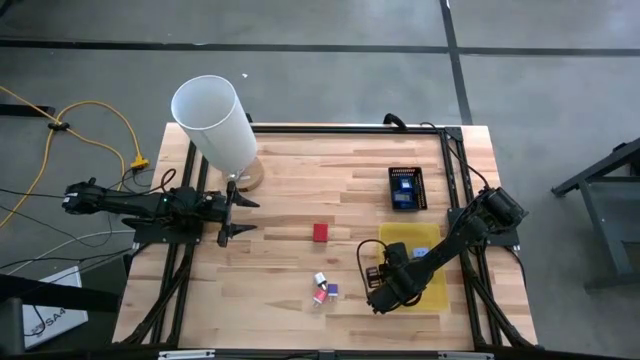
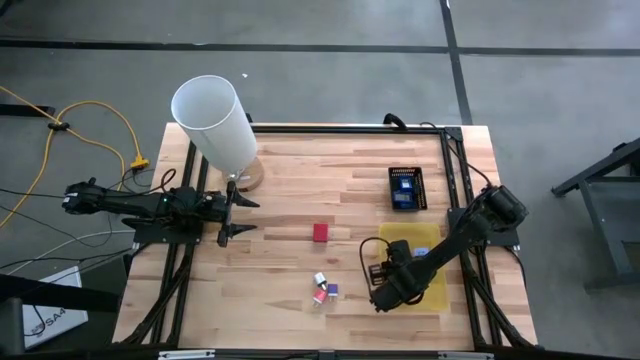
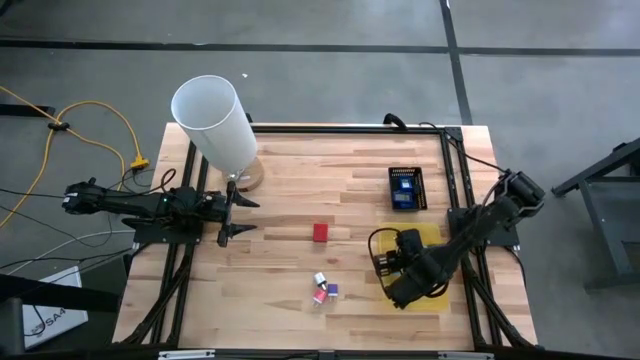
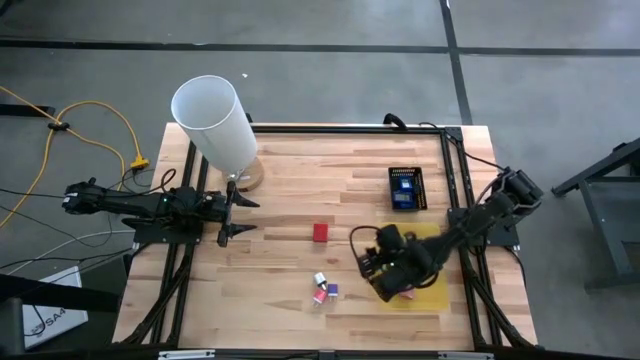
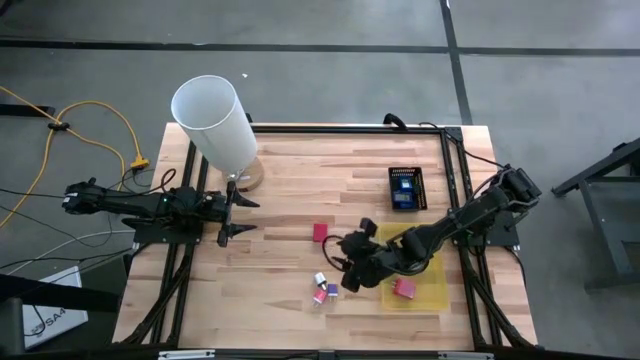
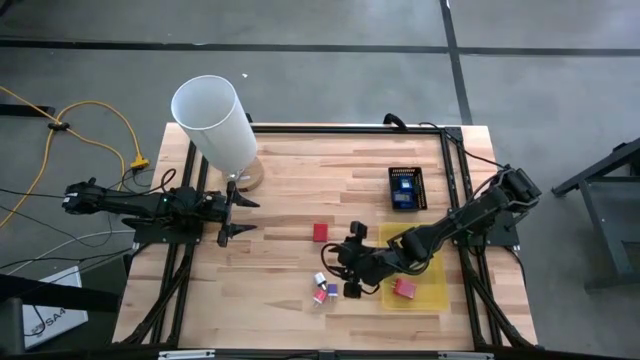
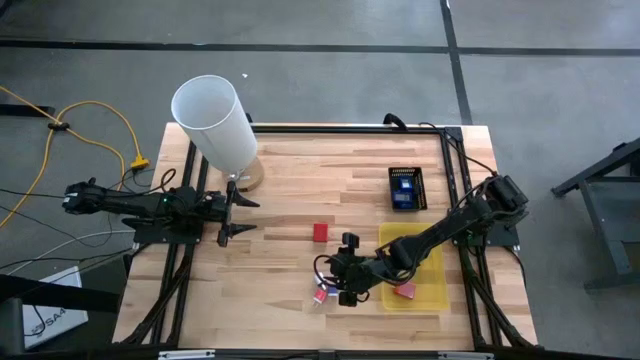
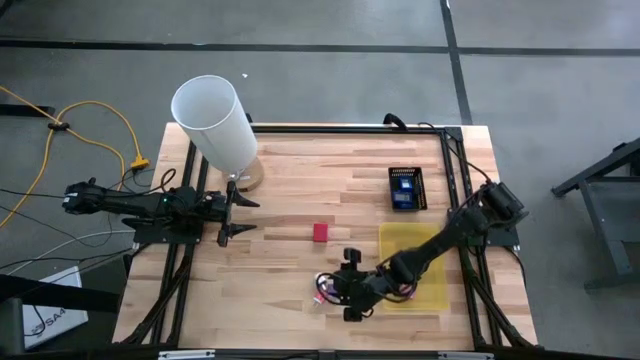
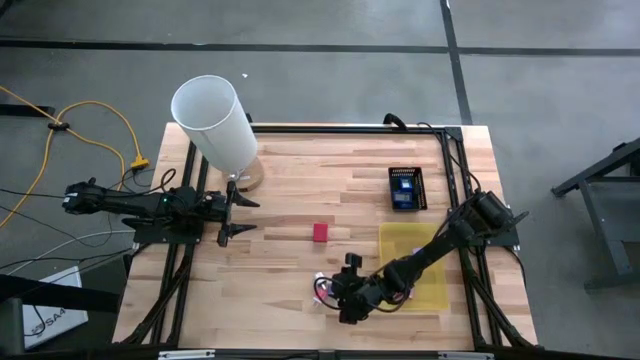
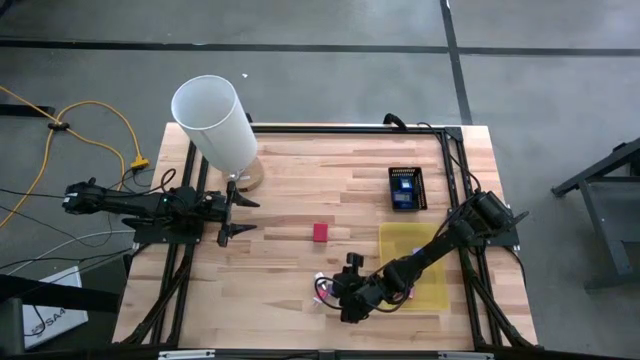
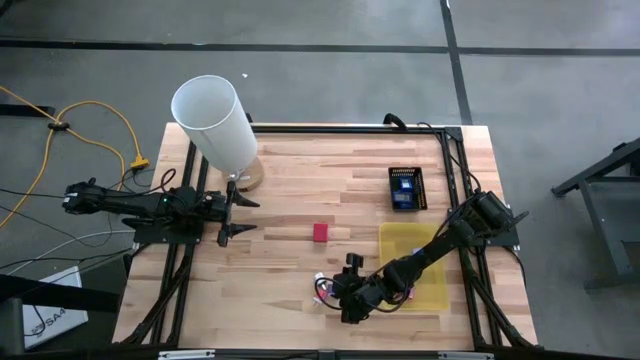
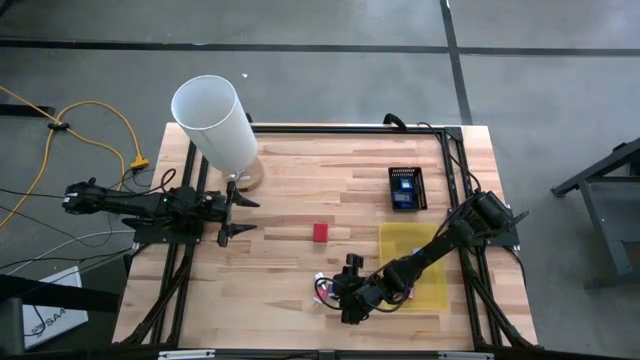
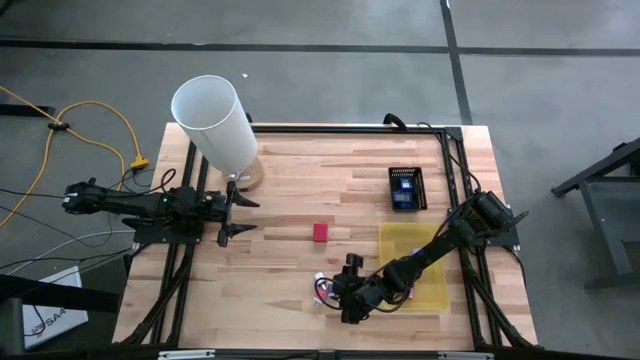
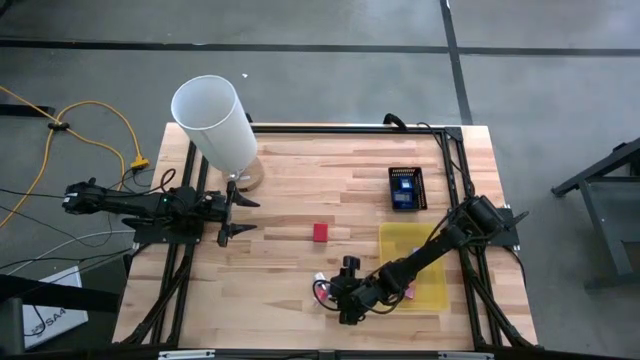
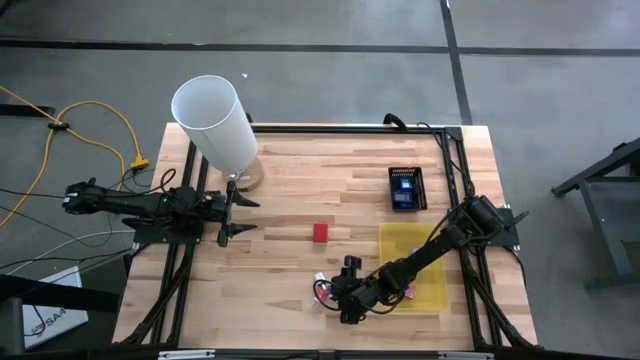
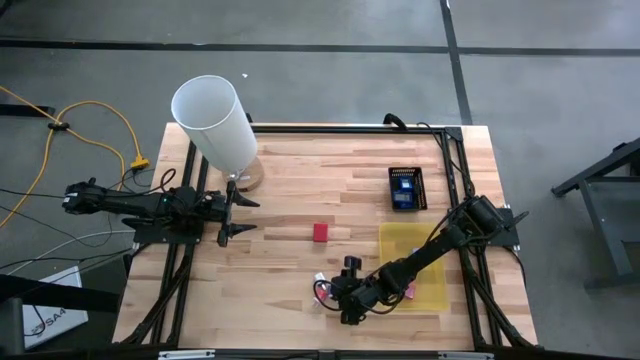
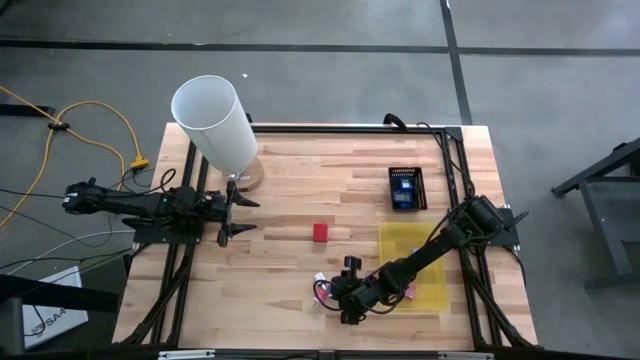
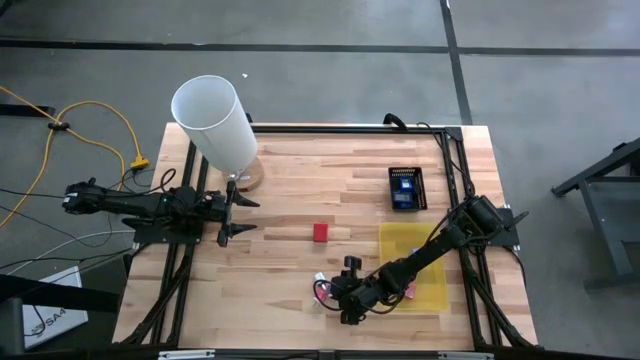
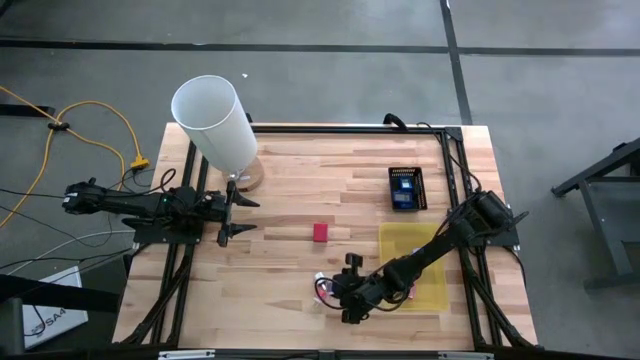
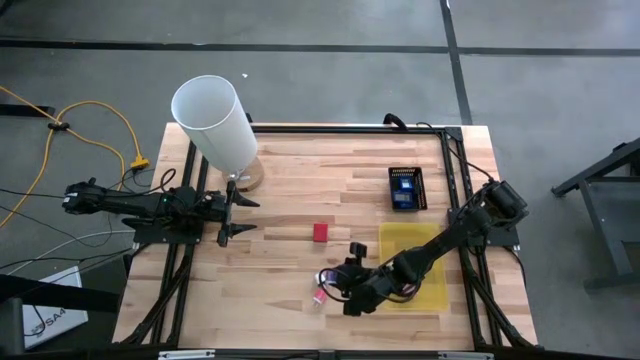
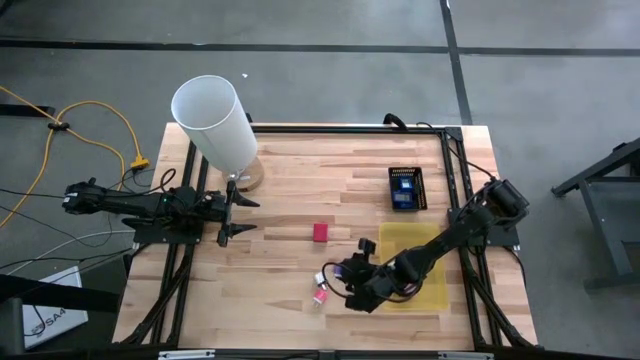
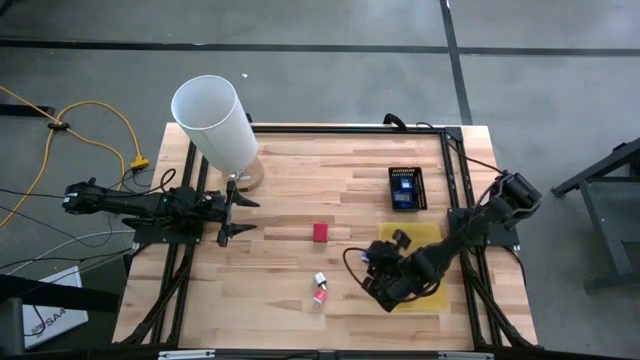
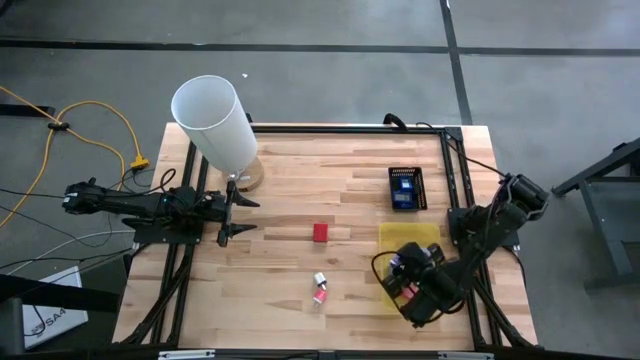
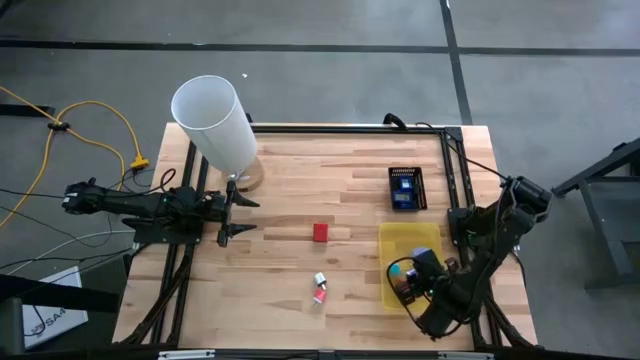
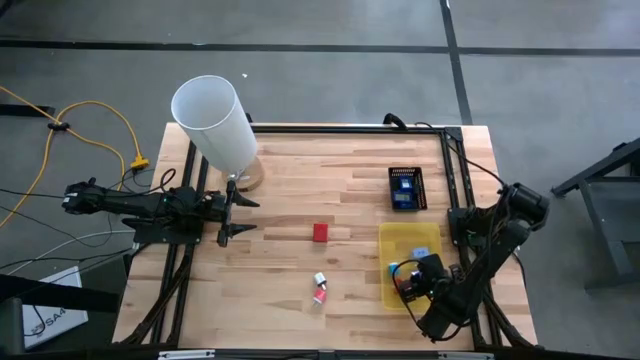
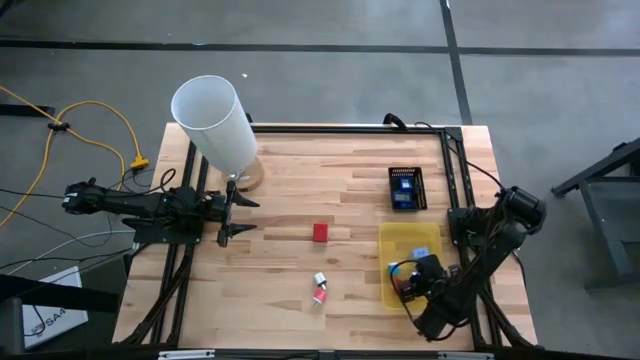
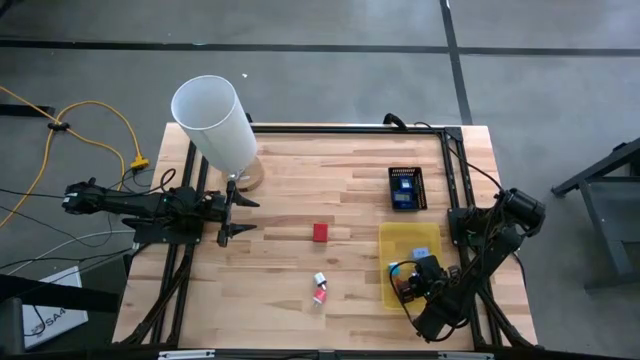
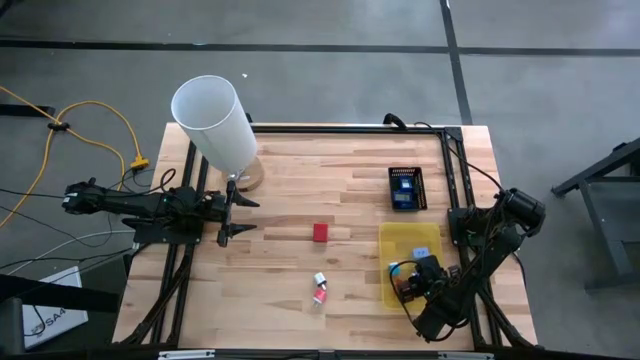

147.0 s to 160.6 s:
Task: Pick & Place Office items
Put the purple charger adapter into the yellow bin

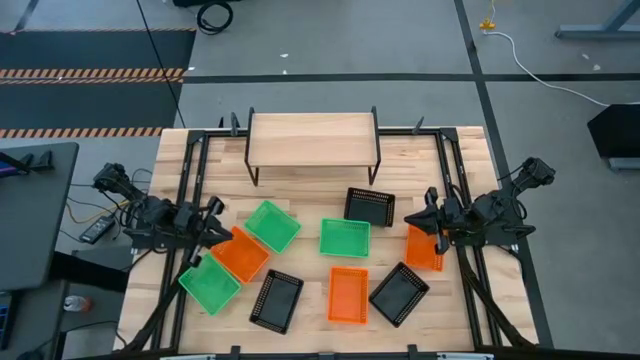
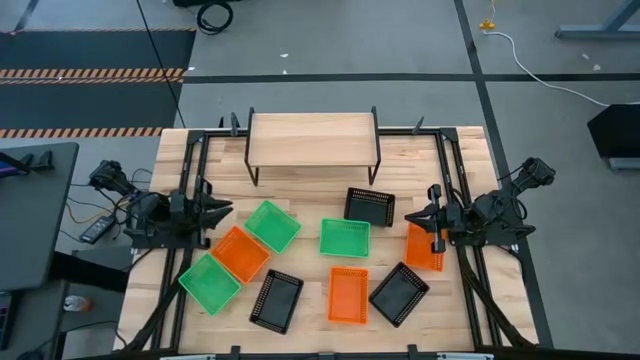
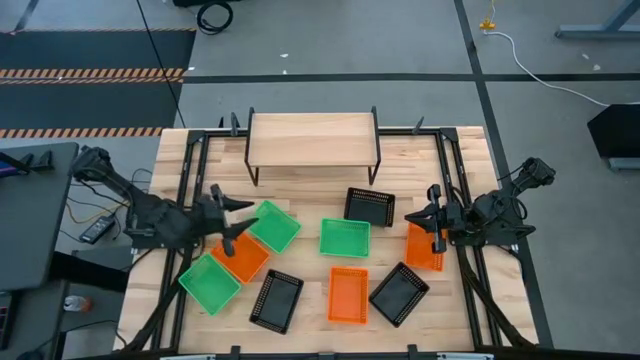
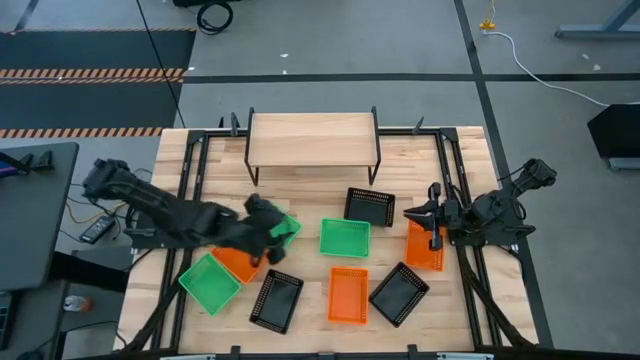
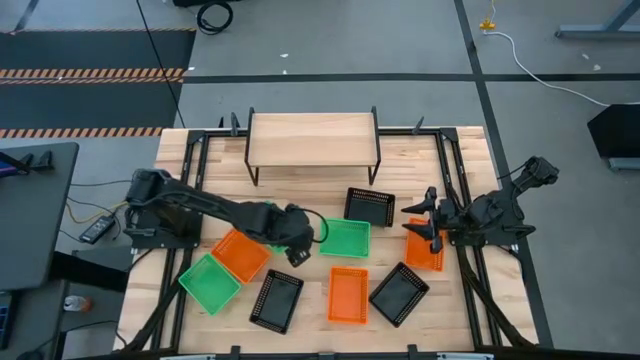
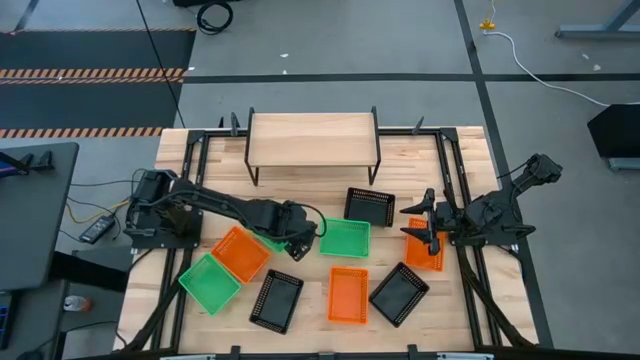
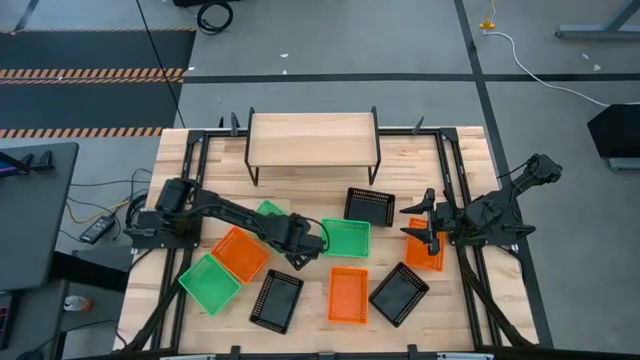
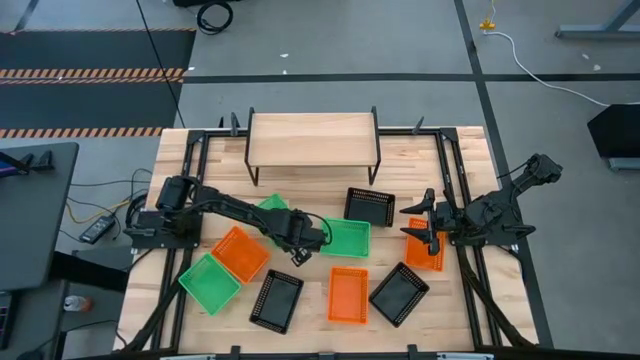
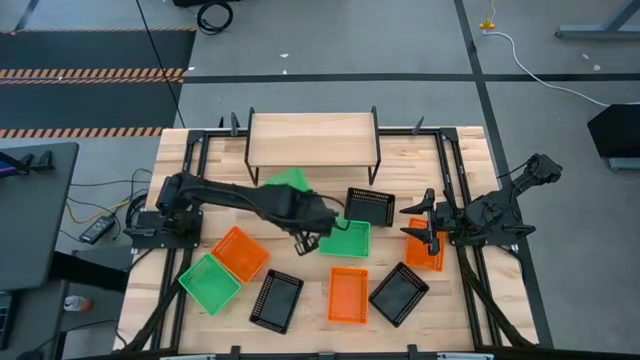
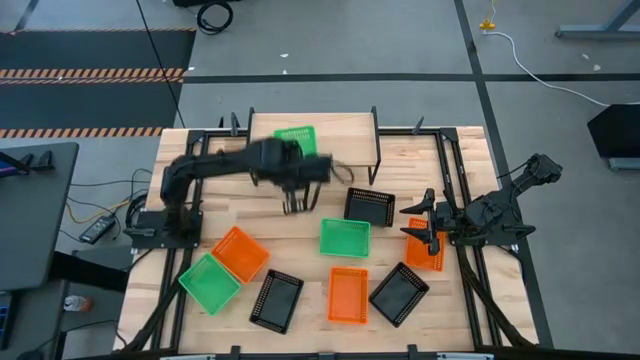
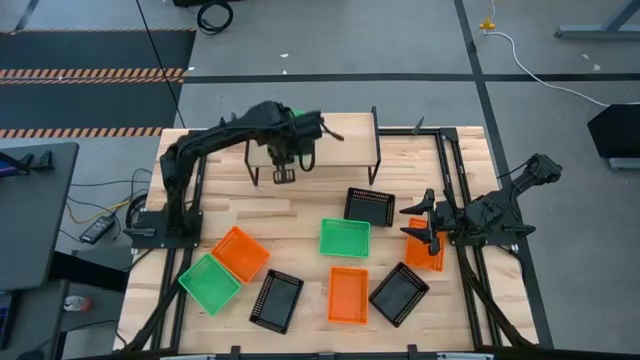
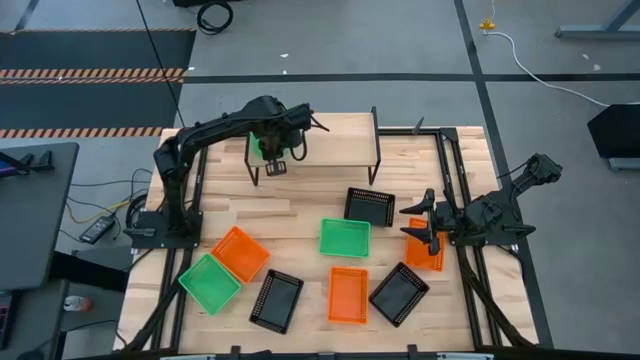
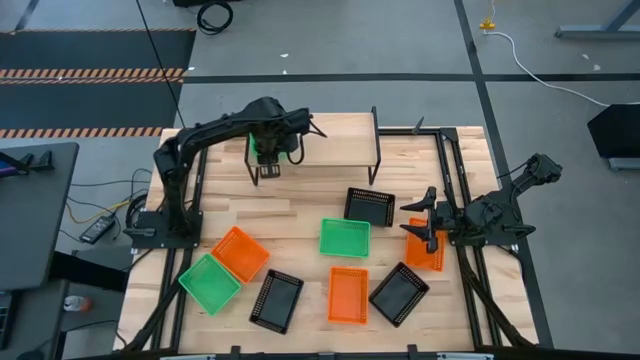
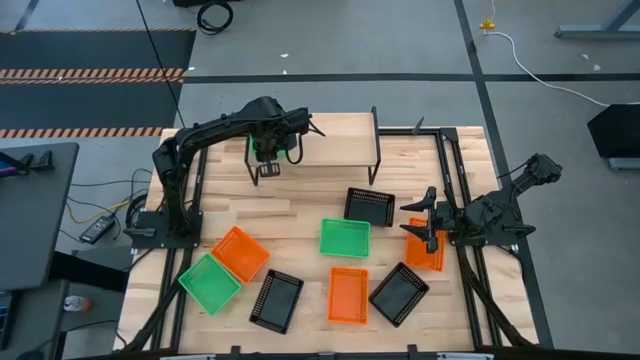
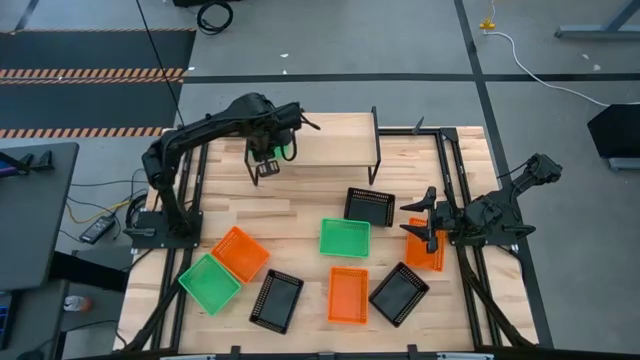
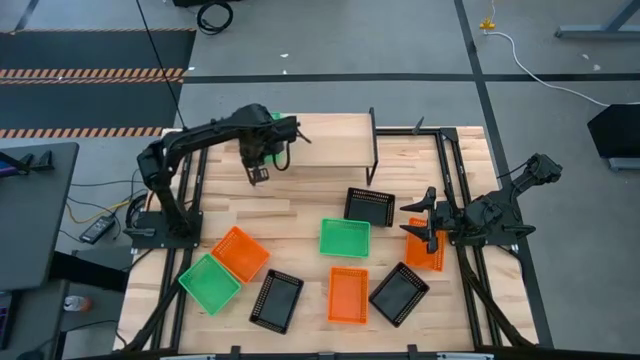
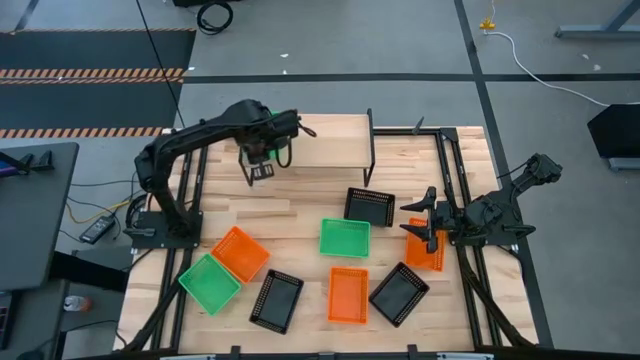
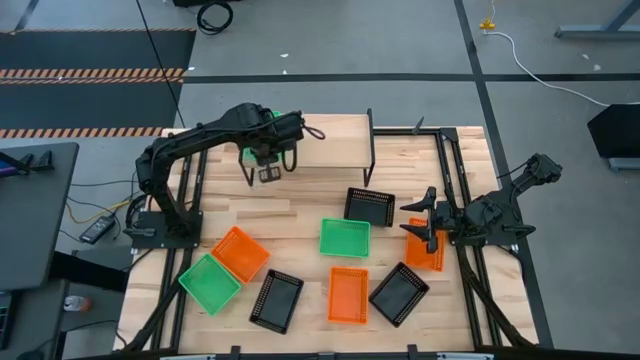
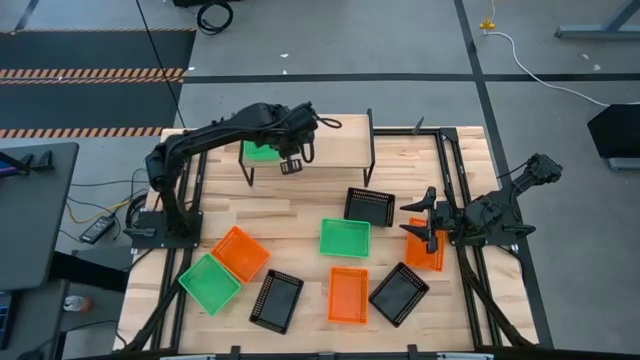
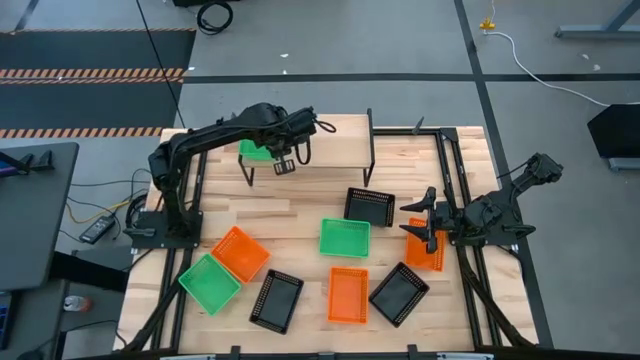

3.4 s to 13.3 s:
Task: Stack baskets on shelf by color
Put the middle green bin on the shelf
